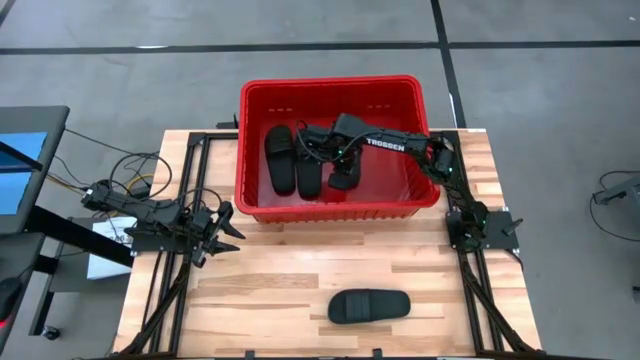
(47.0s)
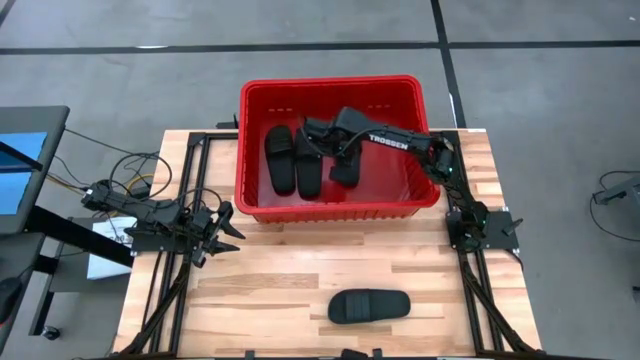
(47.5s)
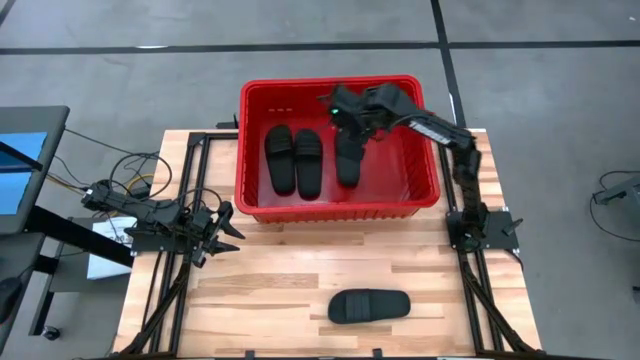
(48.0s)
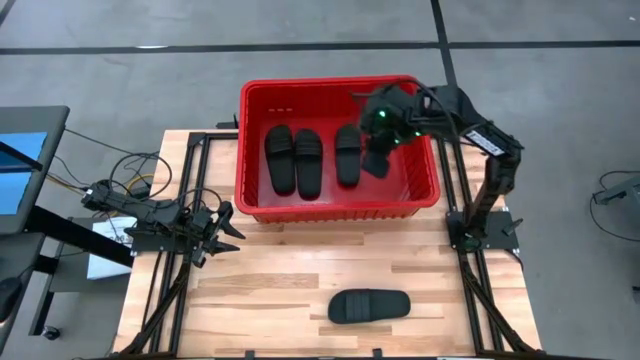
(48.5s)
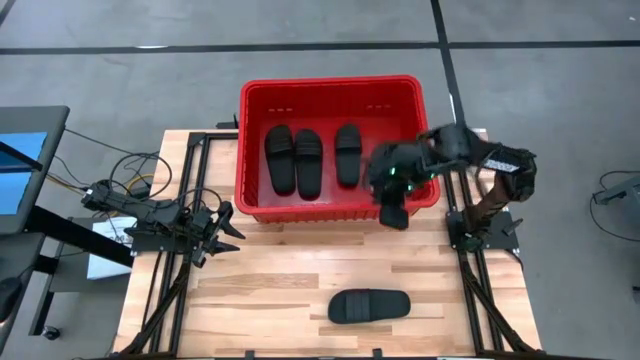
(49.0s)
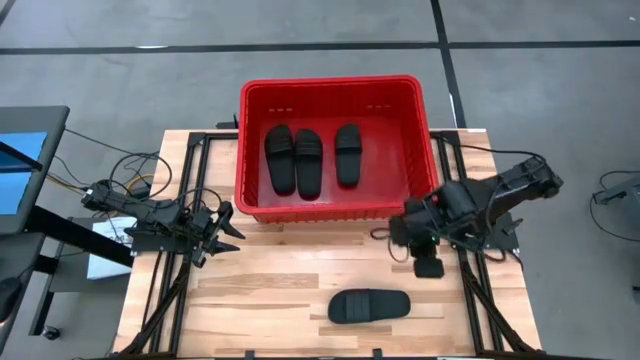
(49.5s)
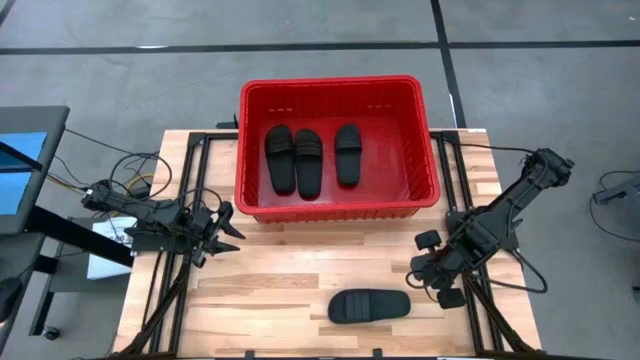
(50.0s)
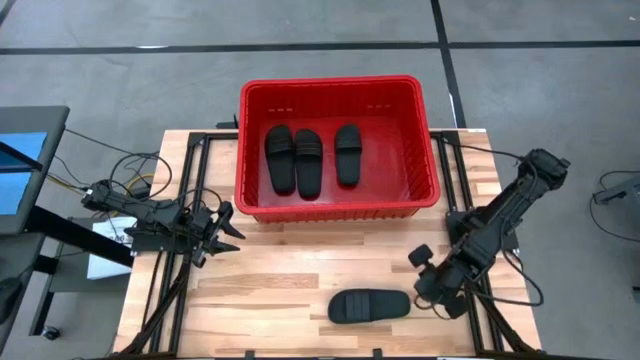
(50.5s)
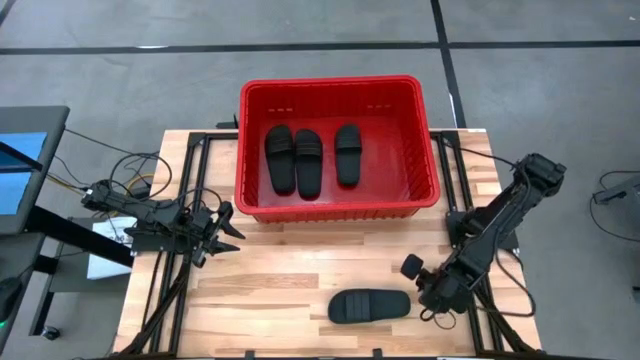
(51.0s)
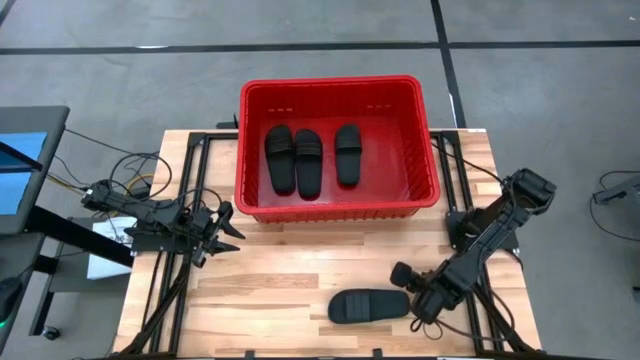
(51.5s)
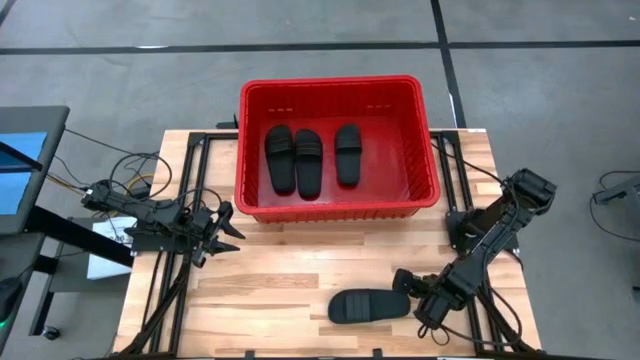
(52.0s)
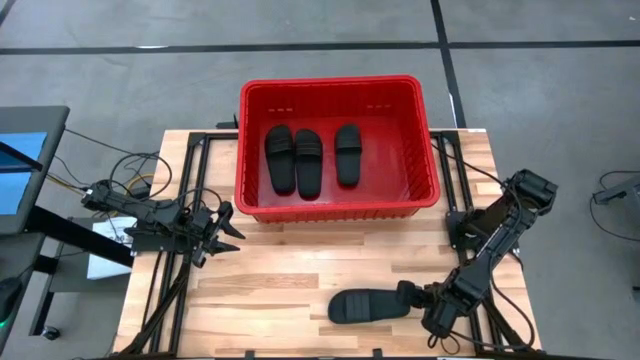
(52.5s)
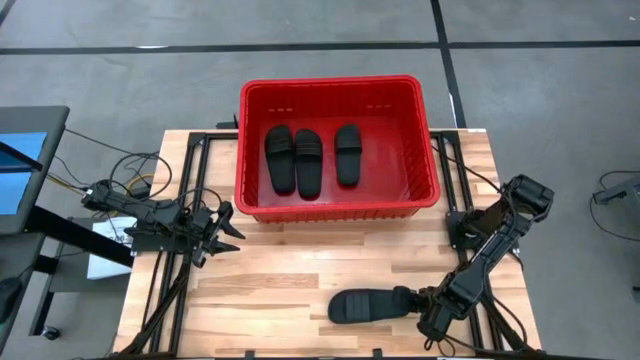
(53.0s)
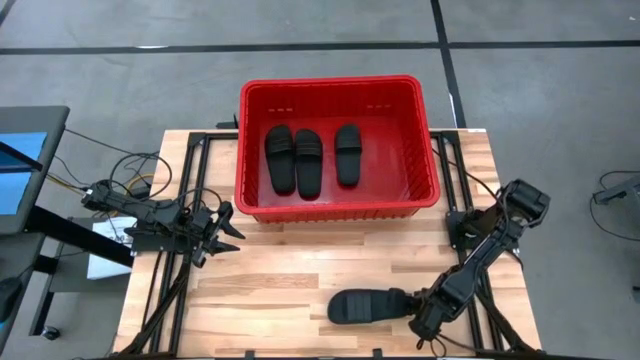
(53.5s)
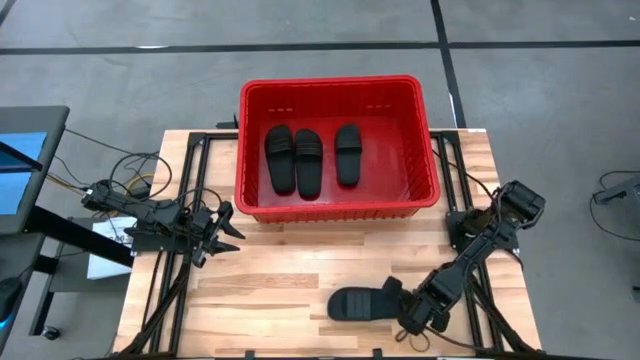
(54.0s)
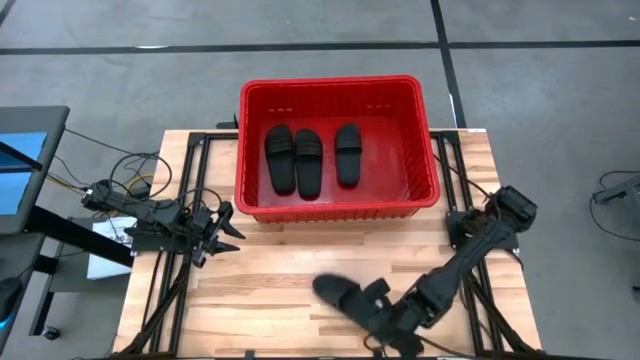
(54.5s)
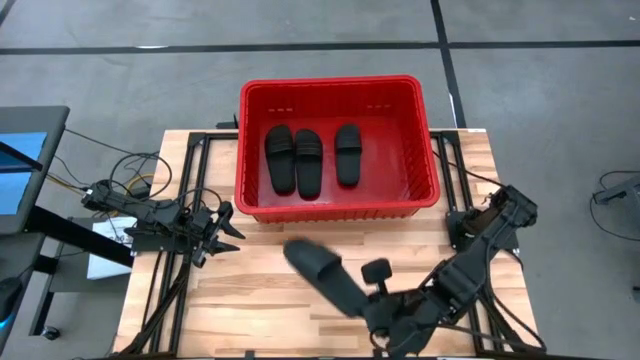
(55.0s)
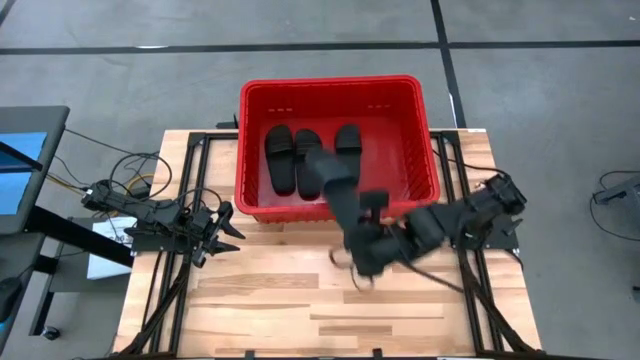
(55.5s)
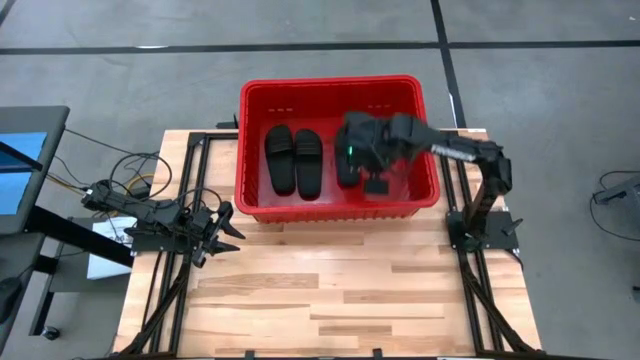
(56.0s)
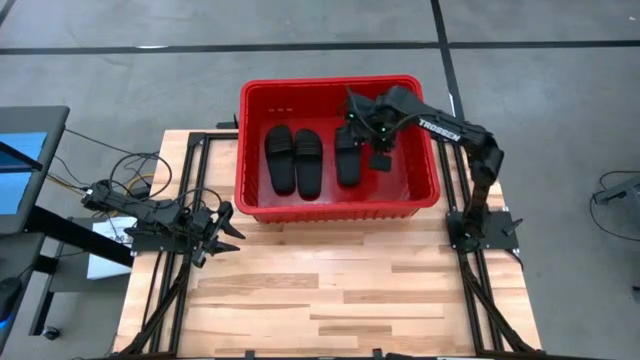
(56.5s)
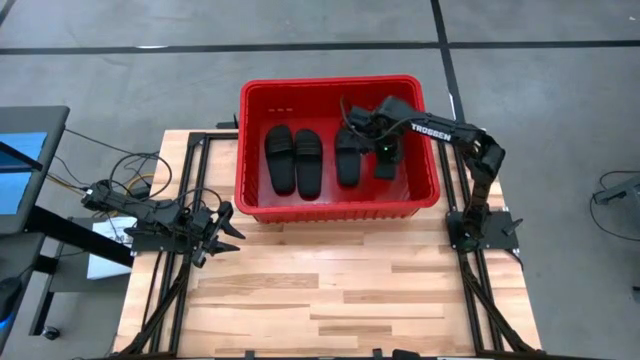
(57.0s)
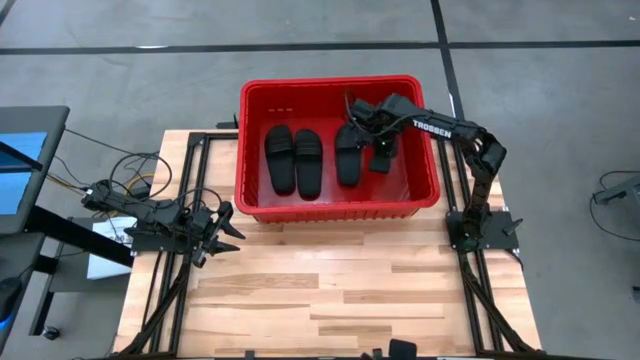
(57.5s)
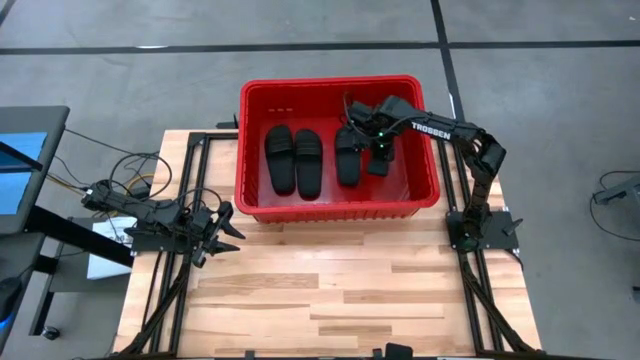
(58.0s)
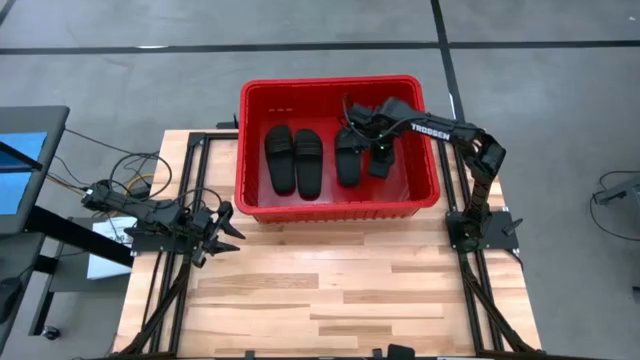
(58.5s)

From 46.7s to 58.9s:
Task: Pick and place slides into bin
Put the slipper into the bin
